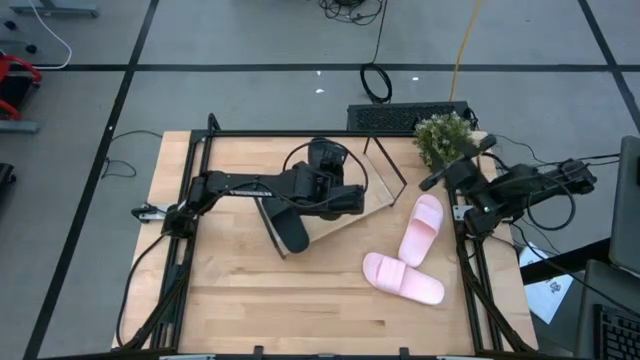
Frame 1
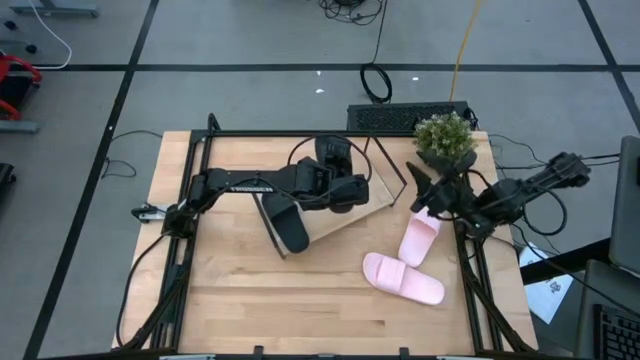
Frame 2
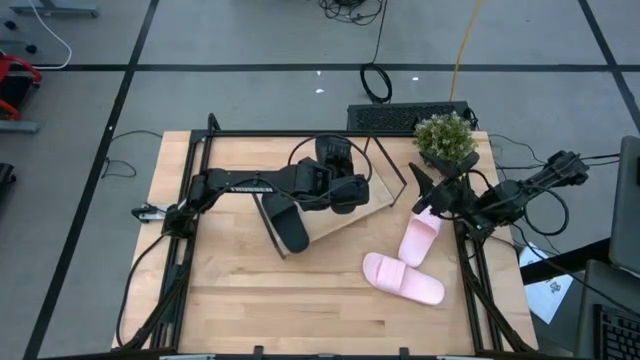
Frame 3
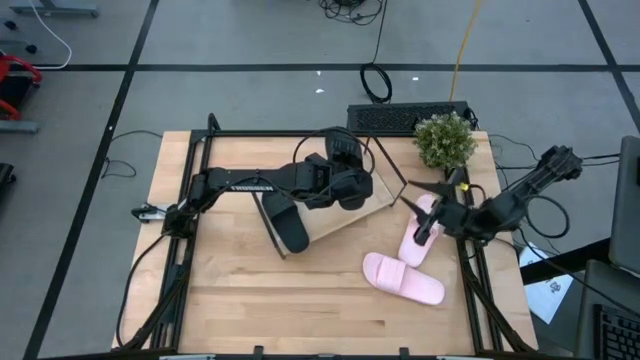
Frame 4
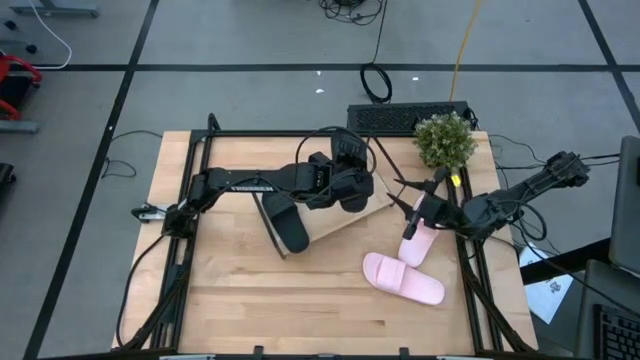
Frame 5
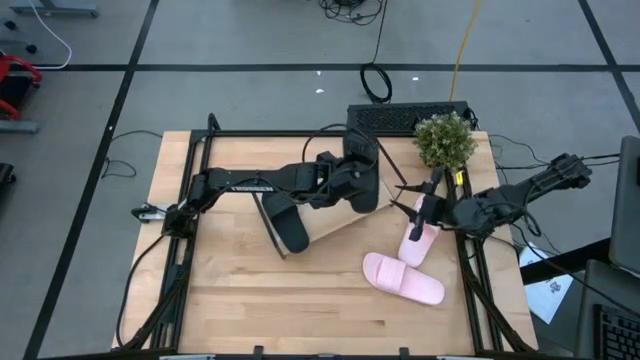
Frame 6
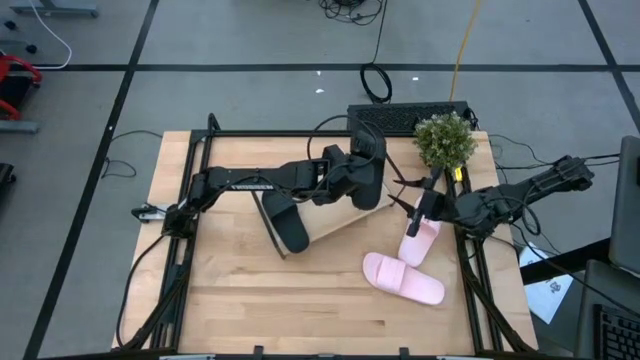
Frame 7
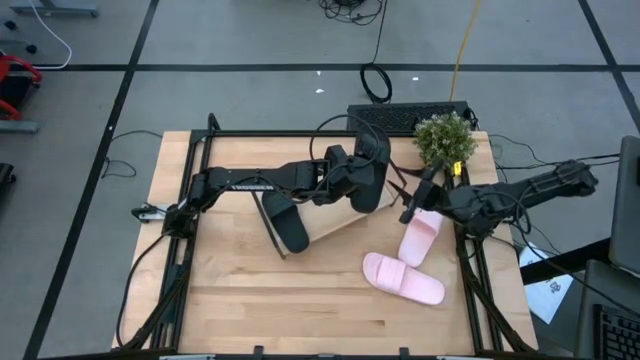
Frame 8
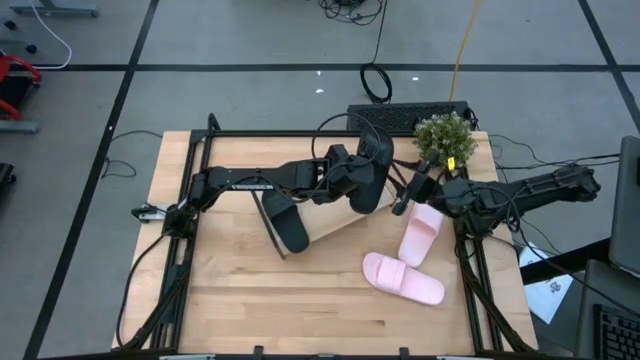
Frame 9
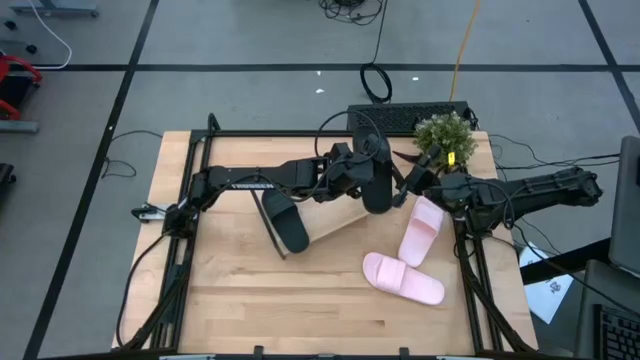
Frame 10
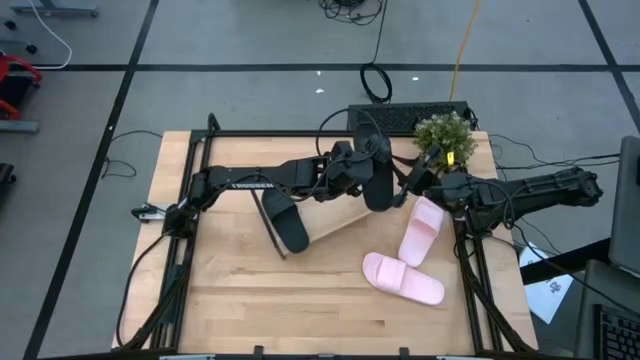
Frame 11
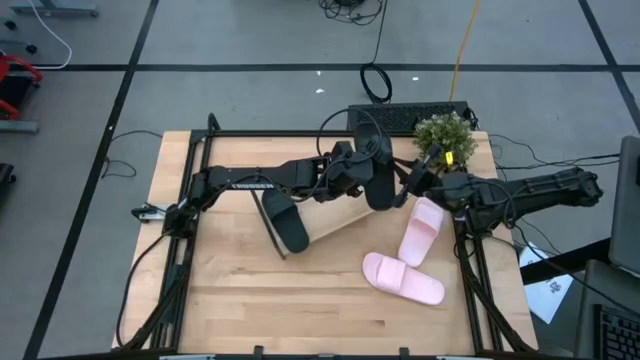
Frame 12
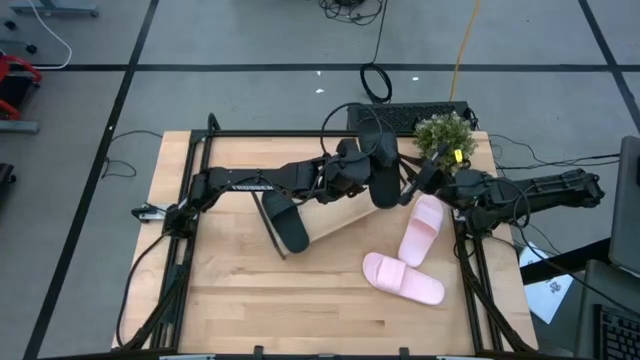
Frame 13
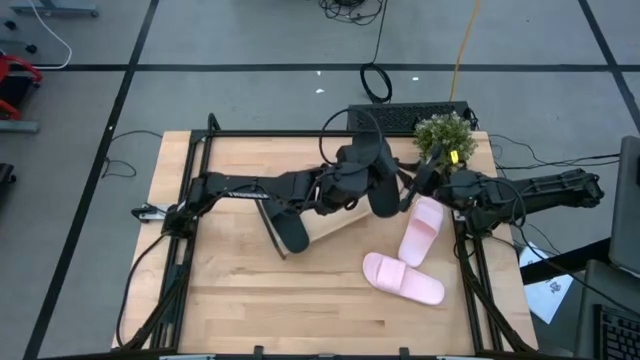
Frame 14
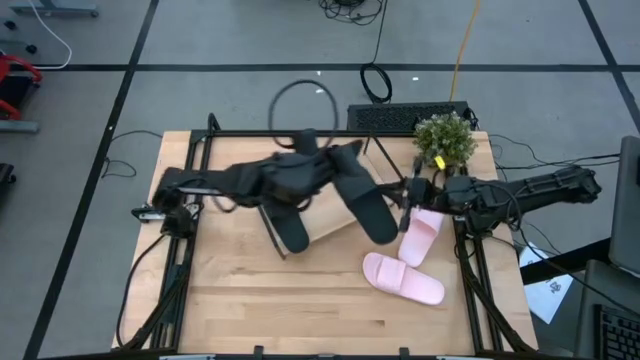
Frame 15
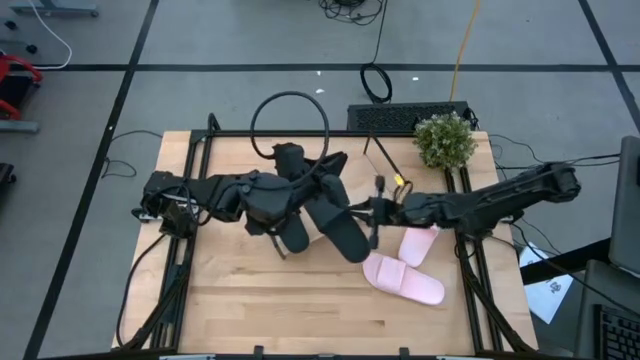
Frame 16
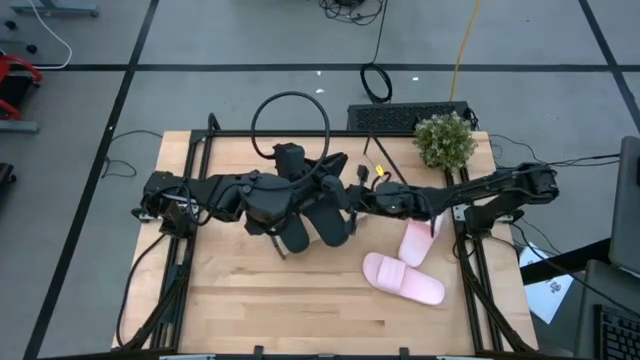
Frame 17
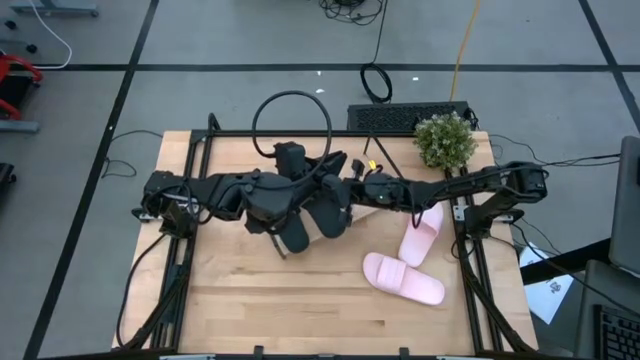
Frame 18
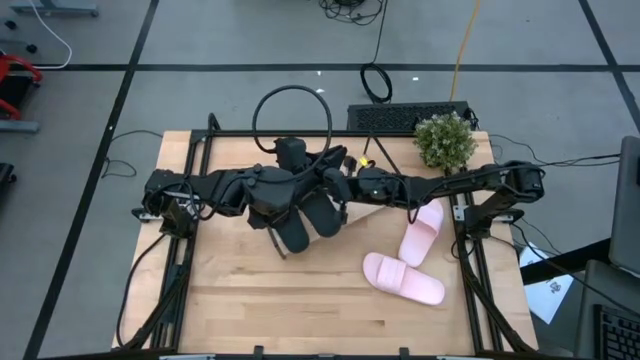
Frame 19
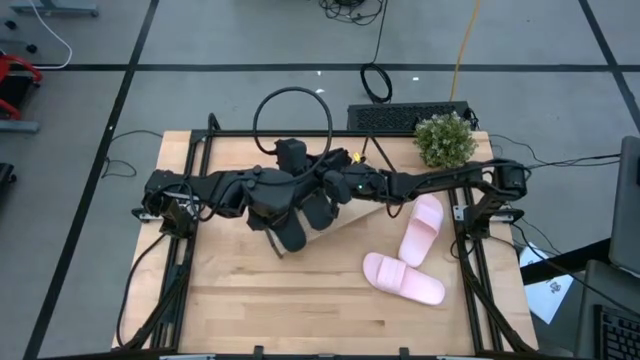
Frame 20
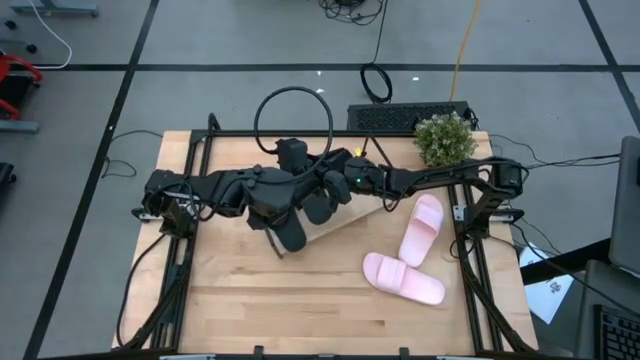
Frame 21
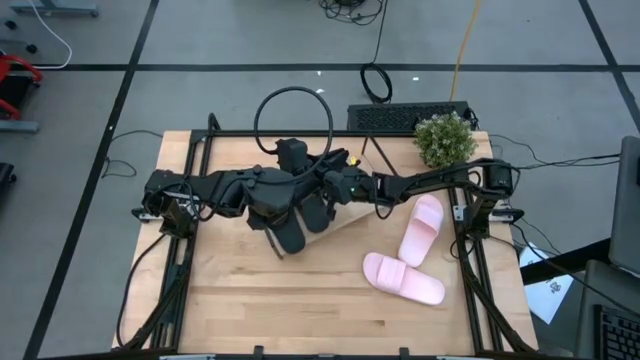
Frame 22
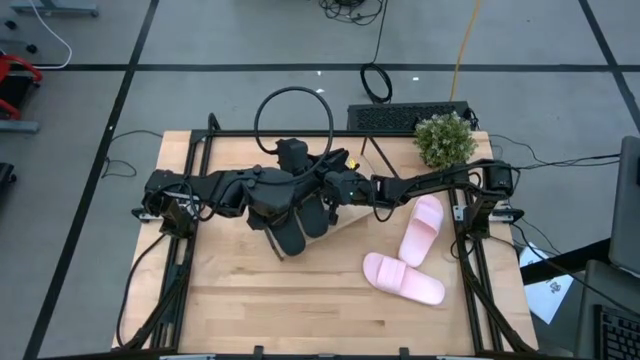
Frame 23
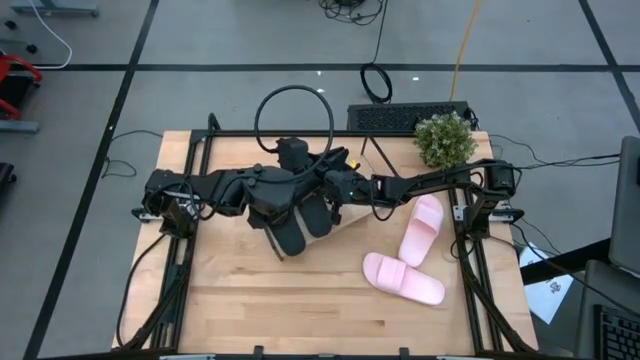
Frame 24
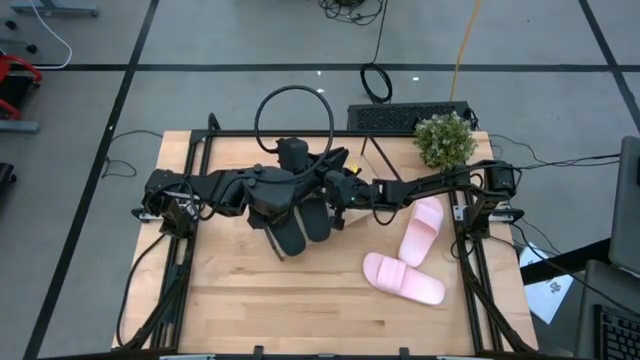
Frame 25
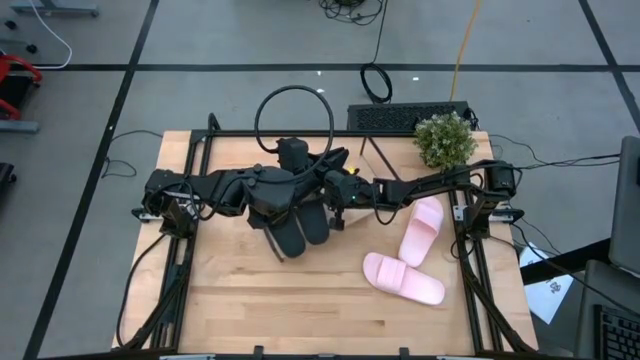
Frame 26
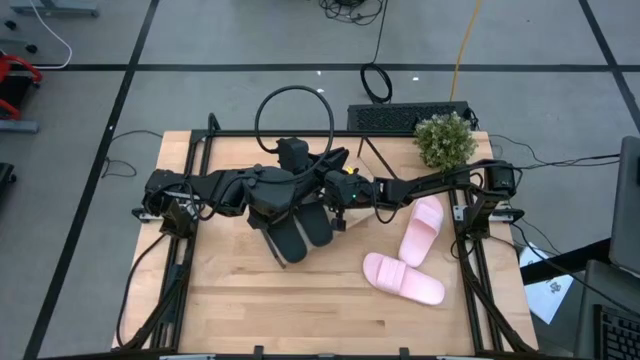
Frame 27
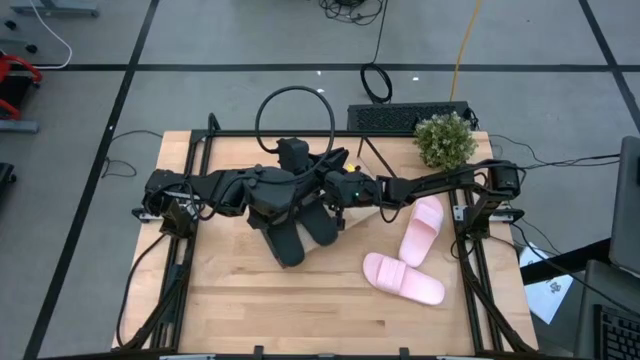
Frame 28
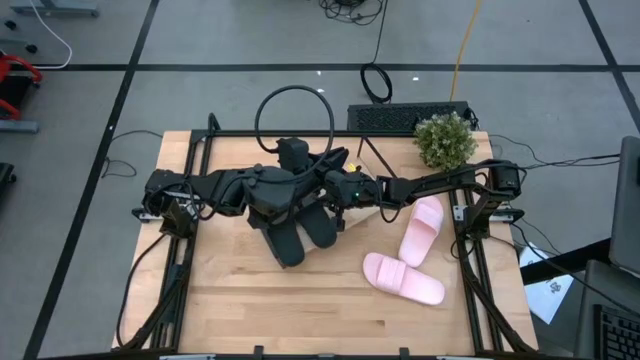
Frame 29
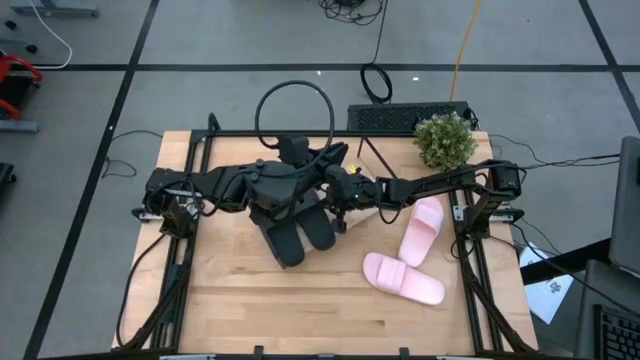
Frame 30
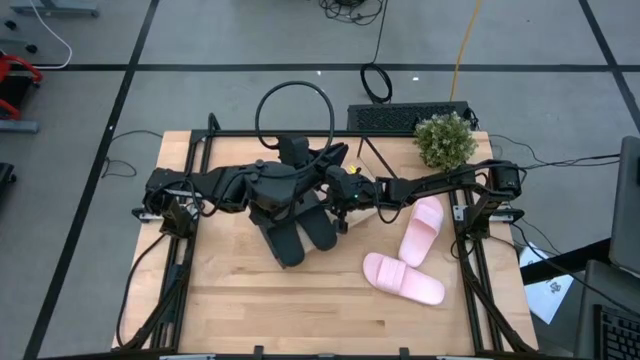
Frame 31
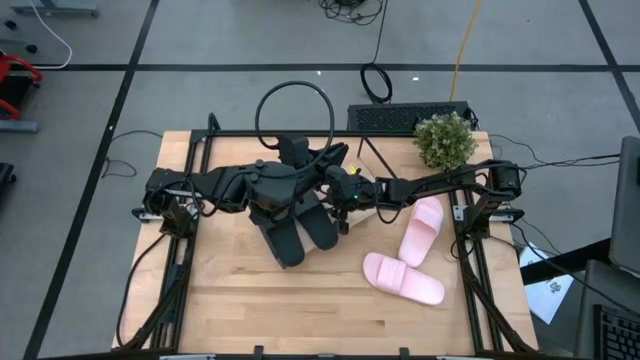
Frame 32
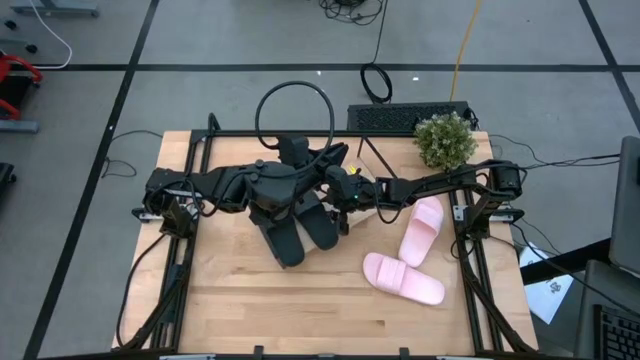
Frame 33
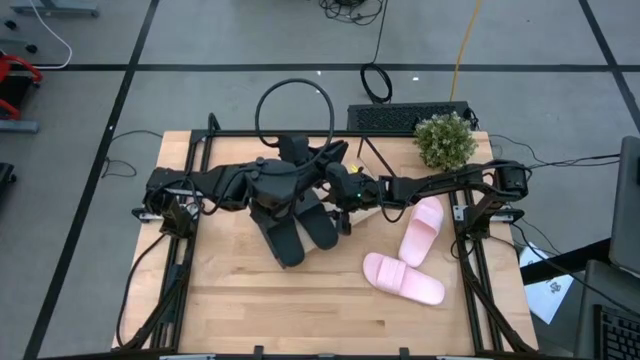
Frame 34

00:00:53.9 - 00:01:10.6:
Task: Pick and place slides into the shelf
Put the black slipper on the shelf

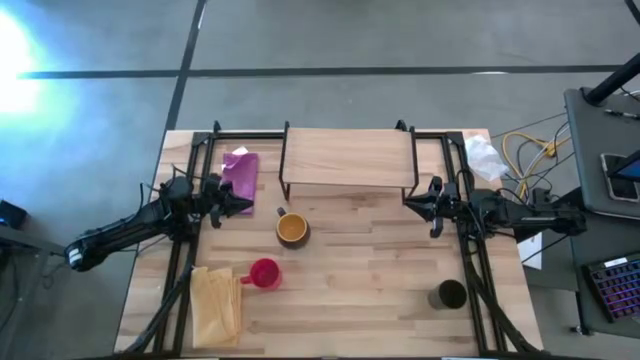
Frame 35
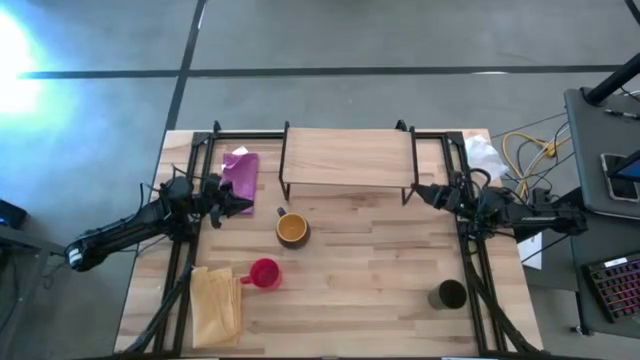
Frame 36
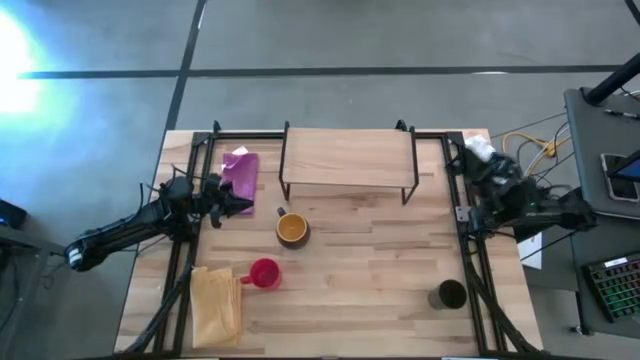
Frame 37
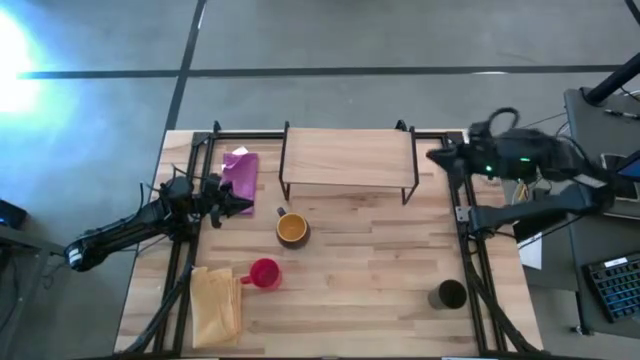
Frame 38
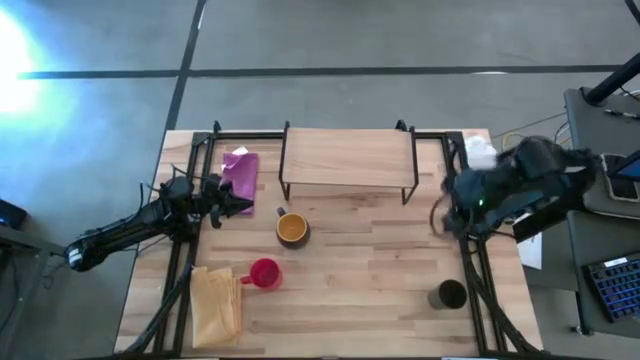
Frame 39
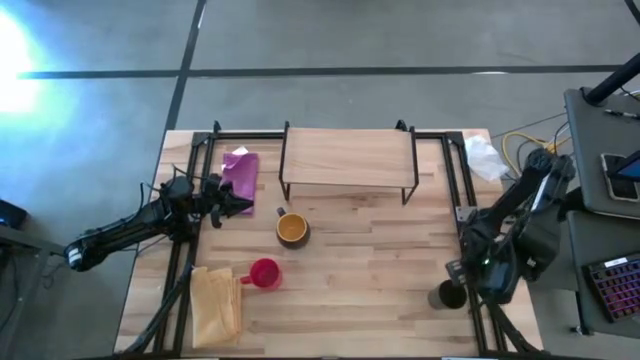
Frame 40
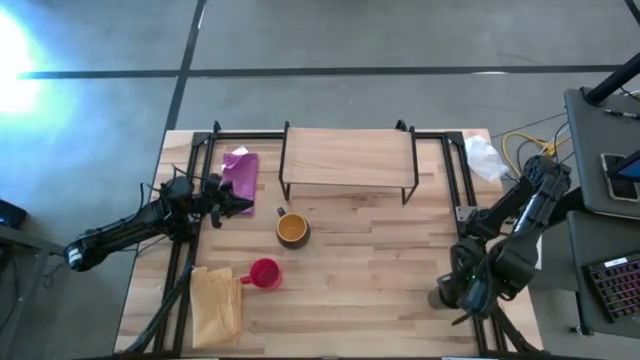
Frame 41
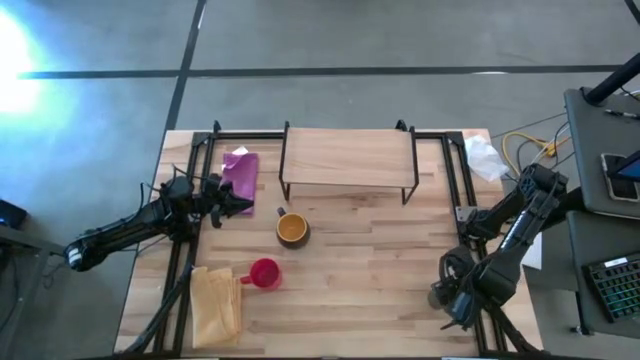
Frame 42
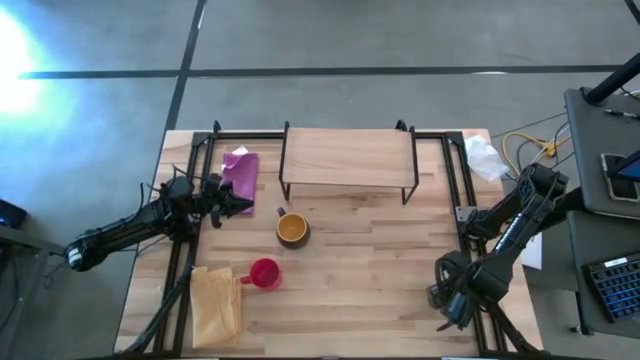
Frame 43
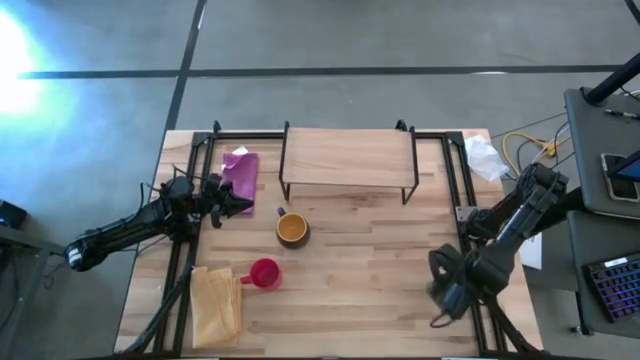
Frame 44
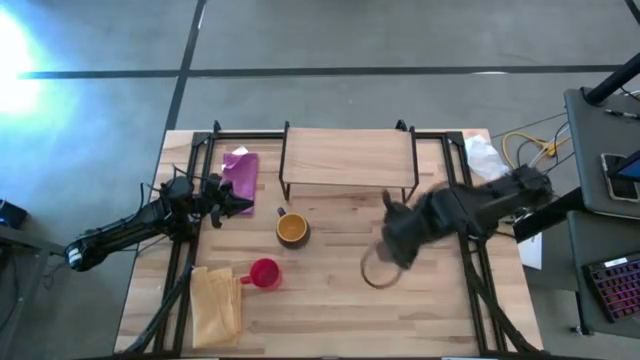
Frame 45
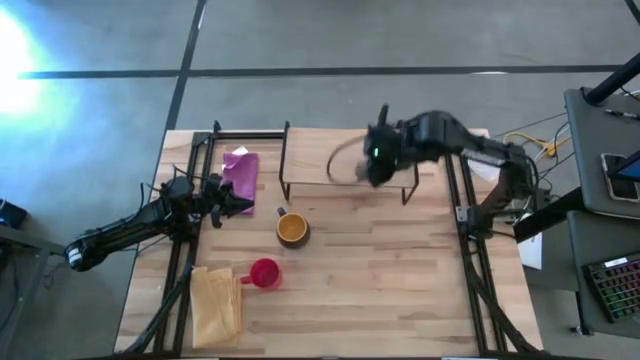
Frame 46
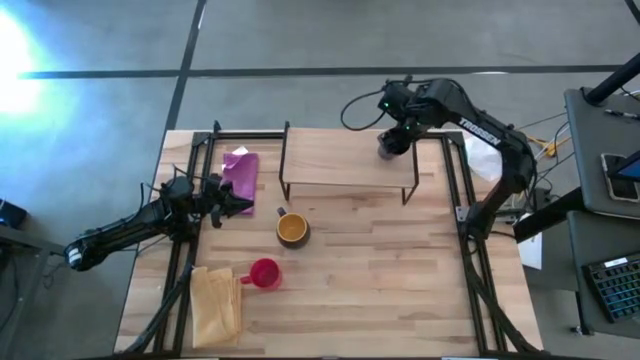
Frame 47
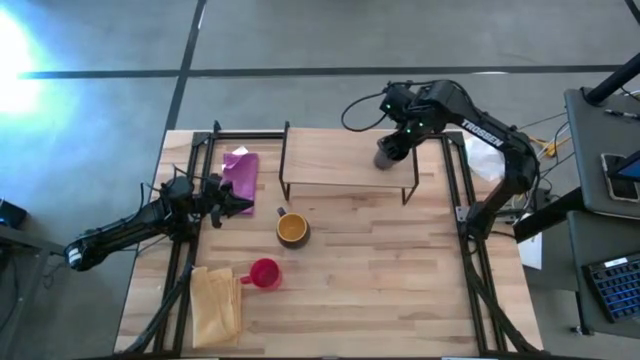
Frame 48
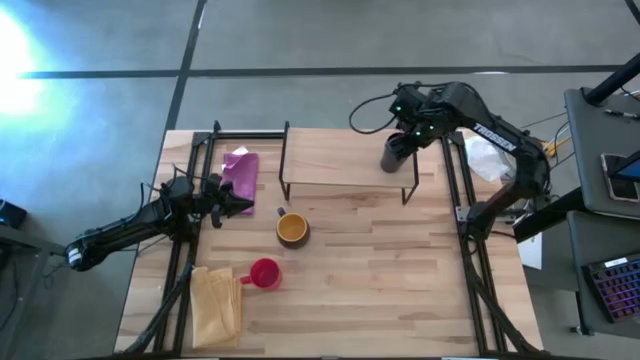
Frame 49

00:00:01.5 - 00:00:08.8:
Task: Stack small to large cups/mugs on shelf
Put the black cup on the shelf
